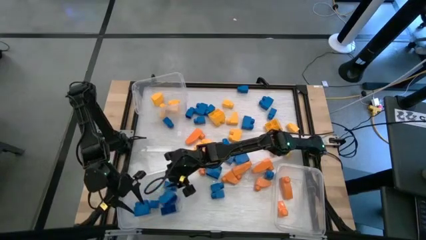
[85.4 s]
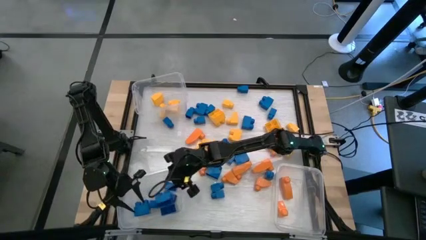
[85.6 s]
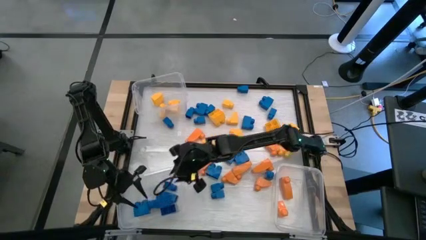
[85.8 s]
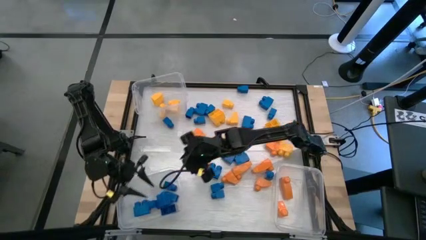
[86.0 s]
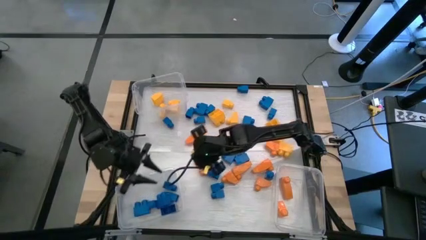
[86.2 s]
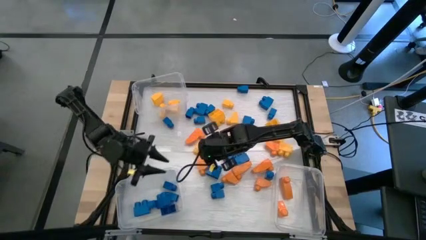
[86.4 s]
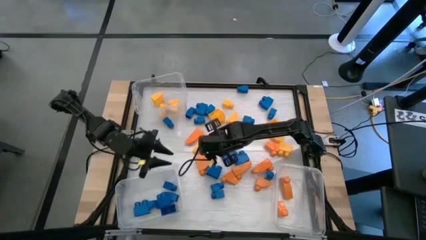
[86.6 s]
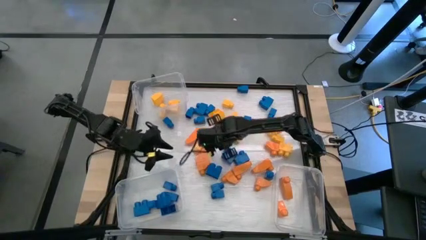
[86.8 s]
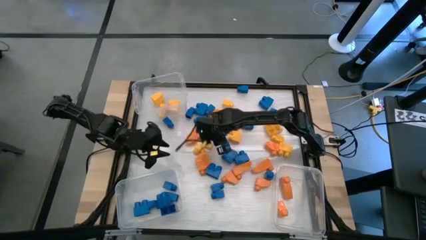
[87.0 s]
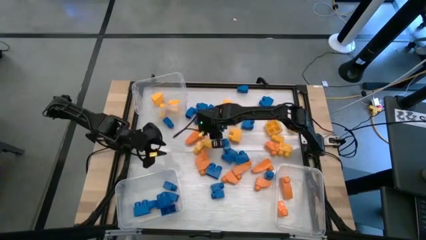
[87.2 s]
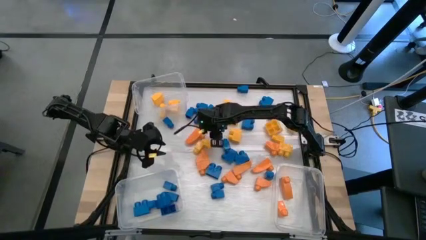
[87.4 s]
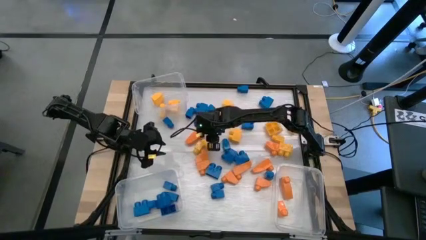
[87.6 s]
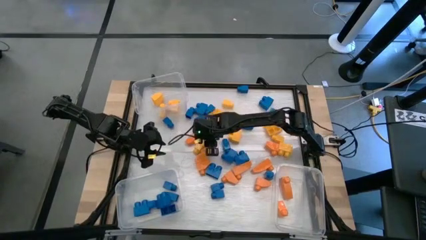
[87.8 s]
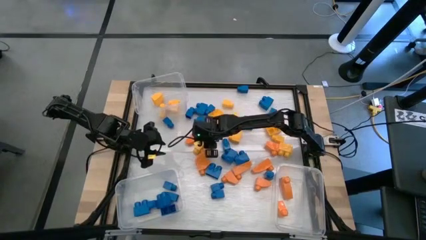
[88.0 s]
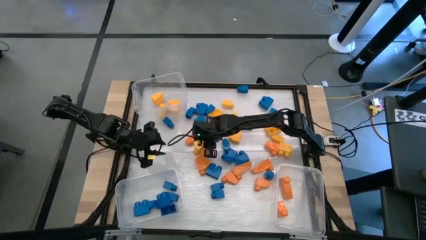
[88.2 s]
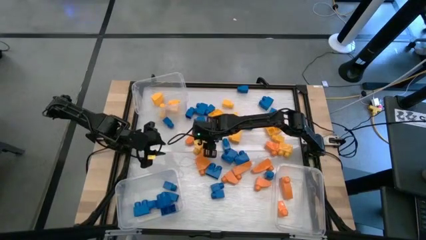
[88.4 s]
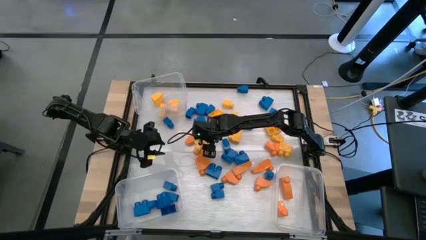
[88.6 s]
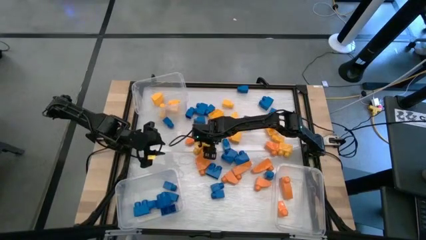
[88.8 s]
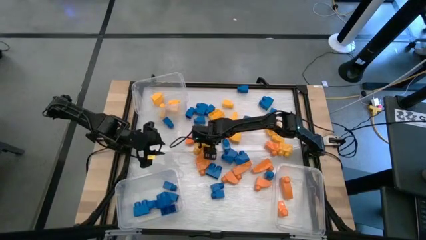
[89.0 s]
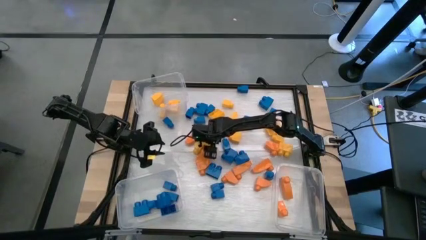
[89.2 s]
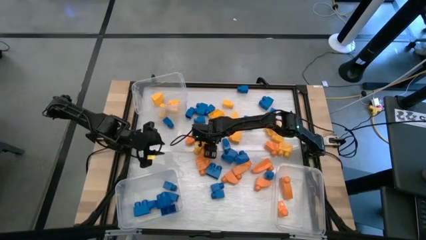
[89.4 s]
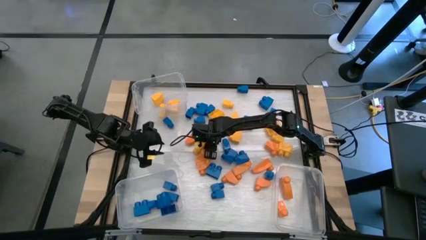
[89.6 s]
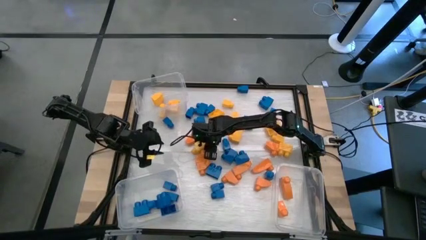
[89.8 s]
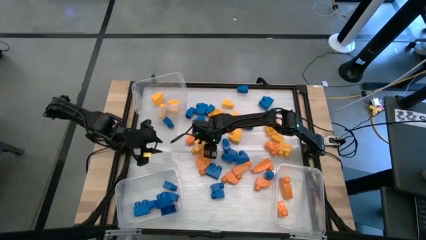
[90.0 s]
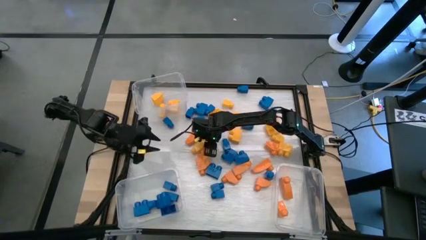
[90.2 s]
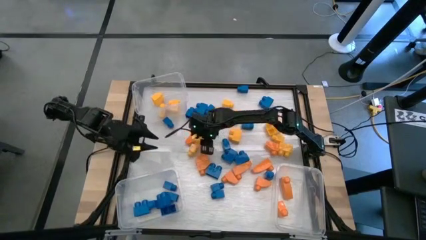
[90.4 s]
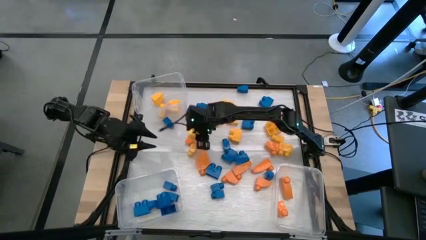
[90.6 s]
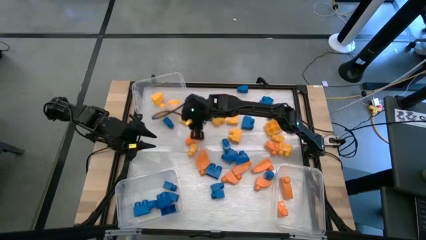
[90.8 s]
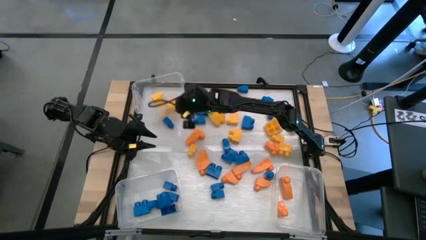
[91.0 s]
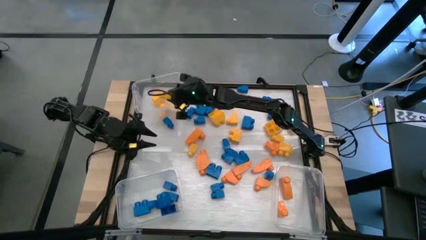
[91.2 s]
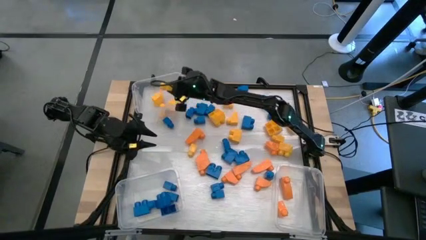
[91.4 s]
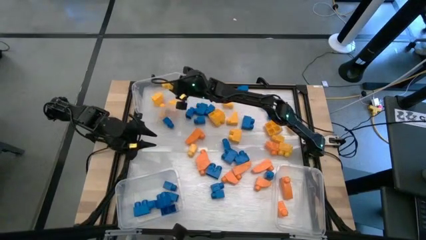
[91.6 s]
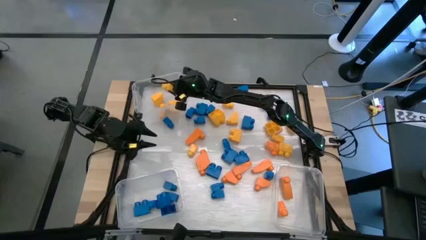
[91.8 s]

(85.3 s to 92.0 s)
Task: Sort blocks
Put the yellow game piece into the top transparent bin

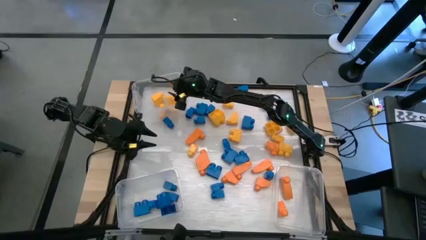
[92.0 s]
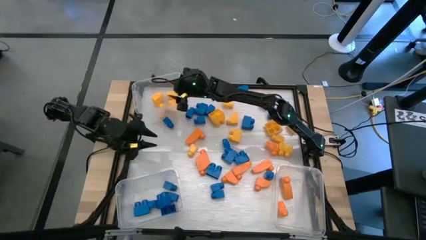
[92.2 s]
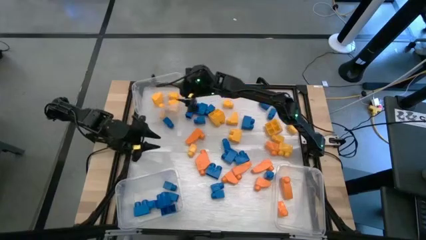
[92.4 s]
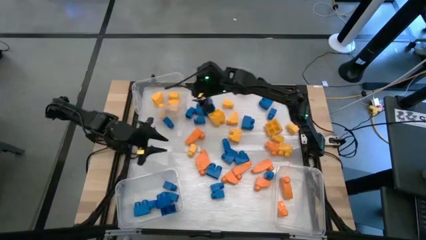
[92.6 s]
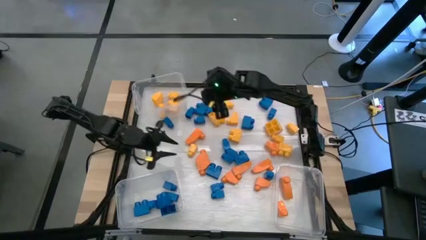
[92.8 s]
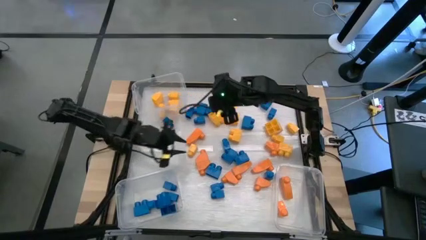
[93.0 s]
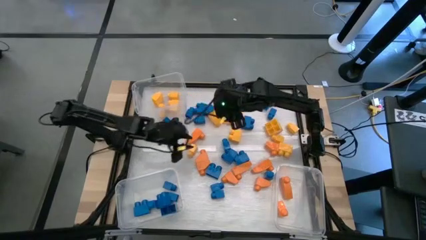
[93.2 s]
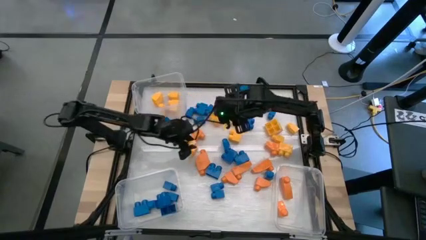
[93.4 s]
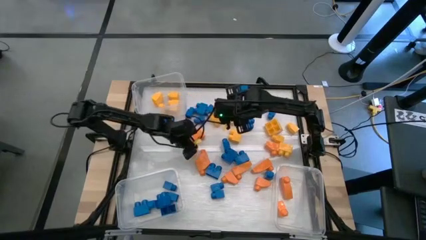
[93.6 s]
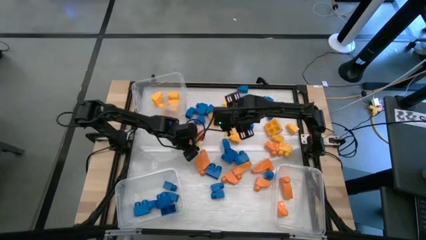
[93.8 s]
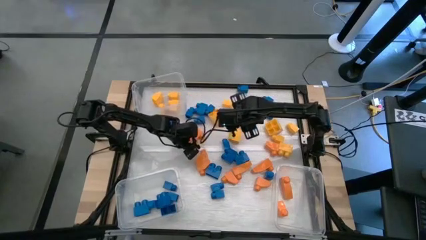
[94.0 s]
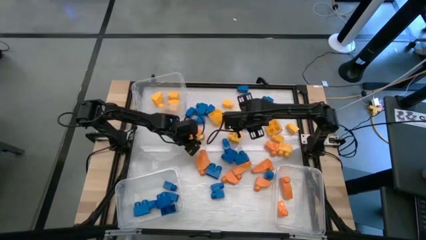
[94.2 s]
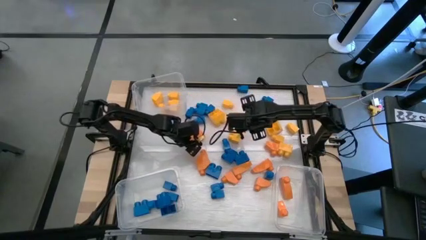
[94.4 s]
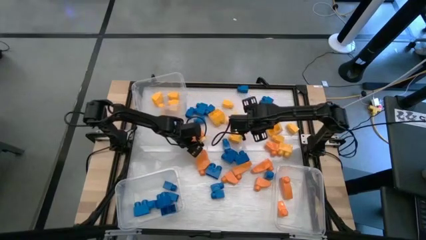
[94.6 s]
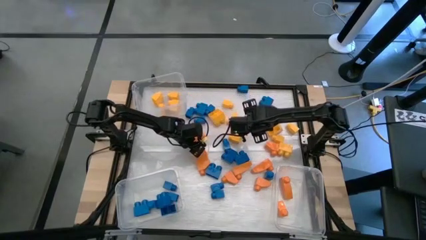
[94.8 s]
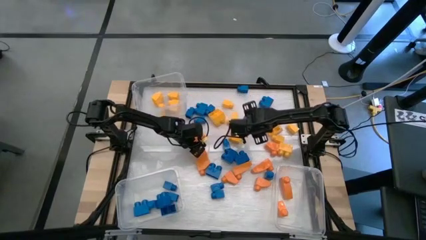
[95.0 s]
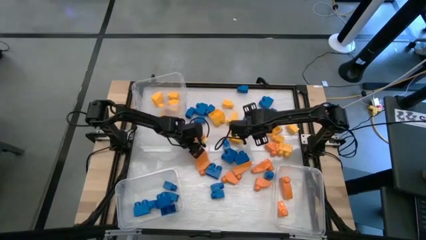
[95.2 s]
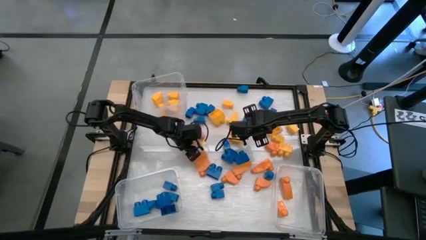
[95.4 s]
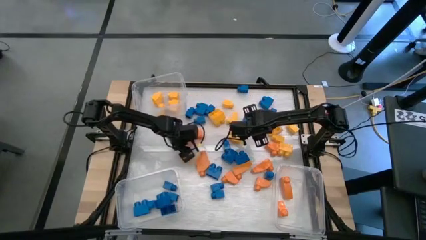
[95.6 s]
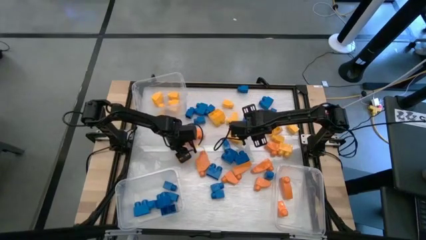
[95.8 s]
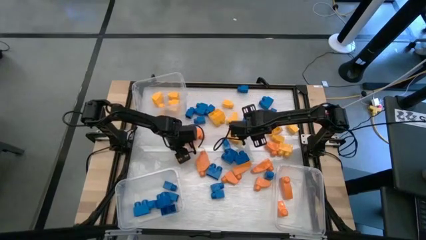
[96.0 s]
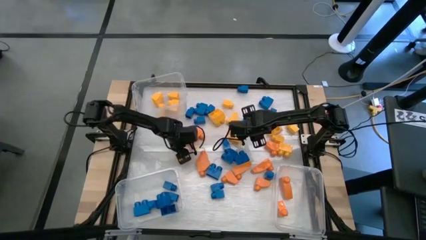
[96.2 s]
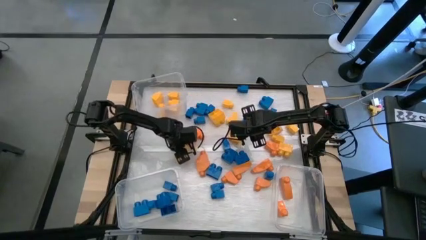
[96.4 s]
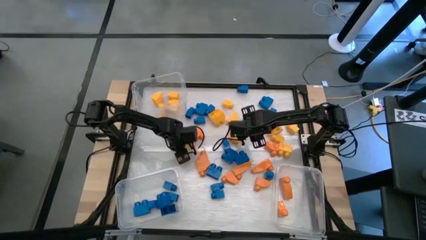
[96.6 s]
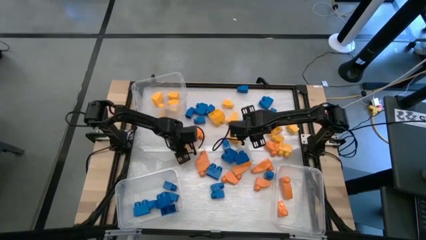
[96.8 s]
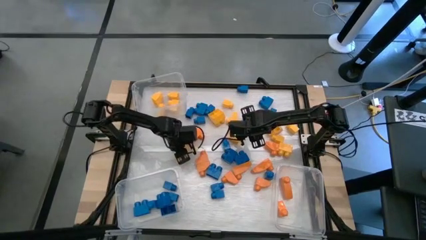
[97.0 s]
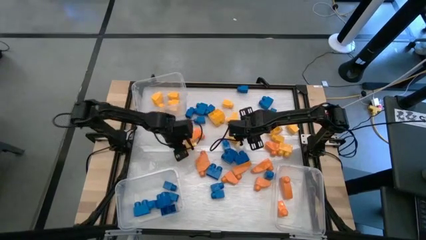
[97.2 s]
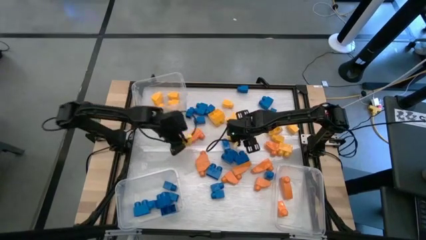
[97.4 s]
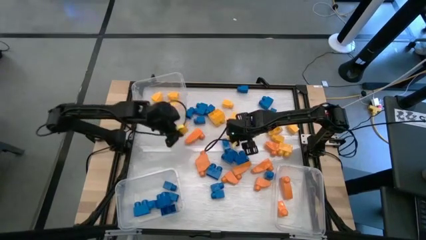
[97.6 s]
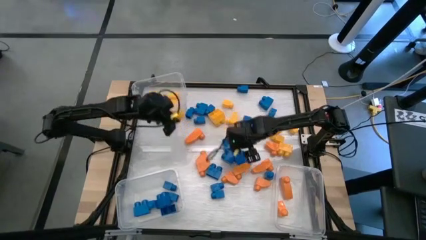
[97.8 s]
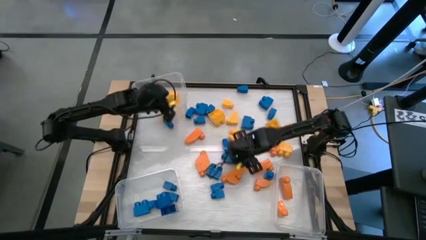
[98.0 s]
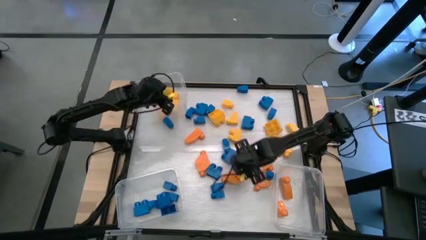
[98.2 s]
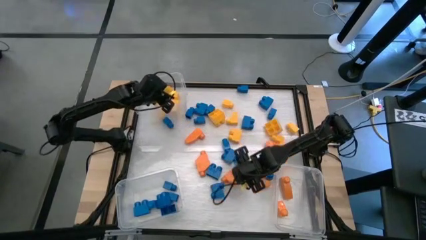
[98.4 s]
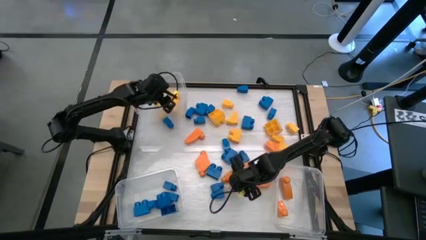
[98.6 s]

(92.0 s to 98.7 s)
Put the yellow game piece into the top transparent bin

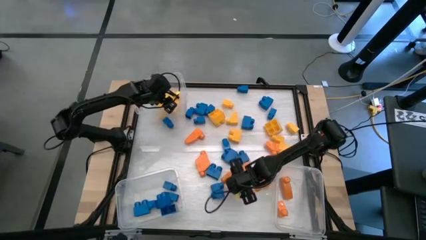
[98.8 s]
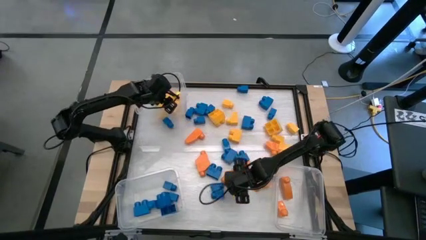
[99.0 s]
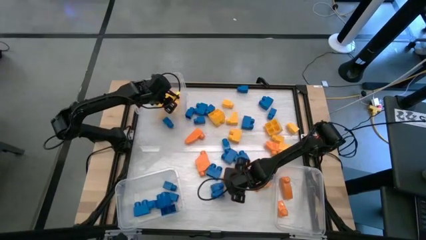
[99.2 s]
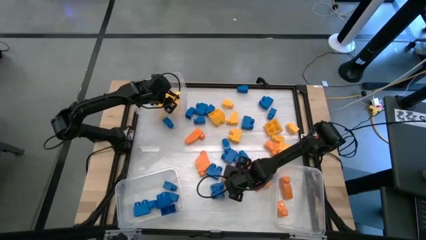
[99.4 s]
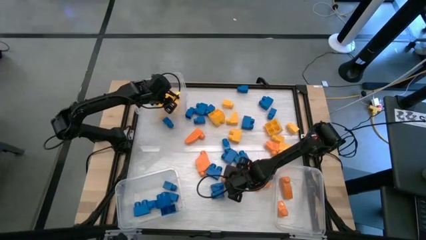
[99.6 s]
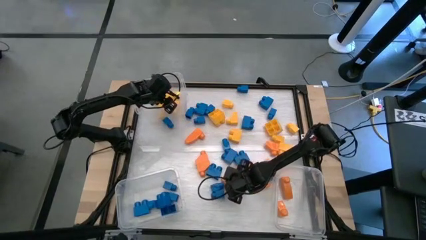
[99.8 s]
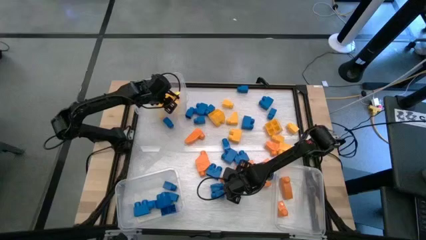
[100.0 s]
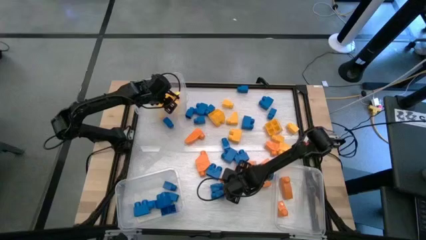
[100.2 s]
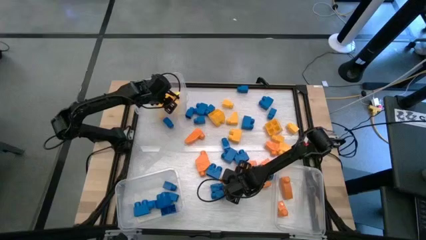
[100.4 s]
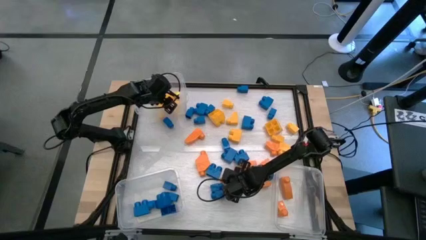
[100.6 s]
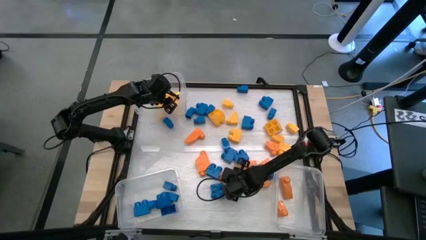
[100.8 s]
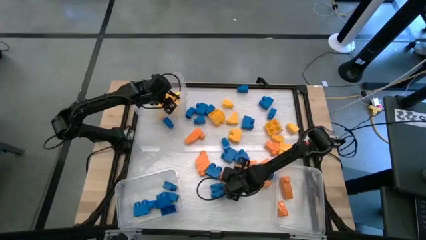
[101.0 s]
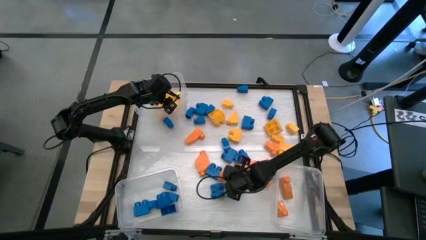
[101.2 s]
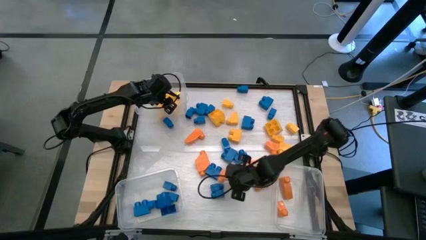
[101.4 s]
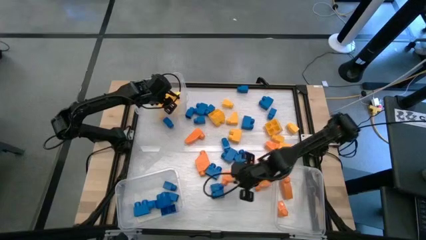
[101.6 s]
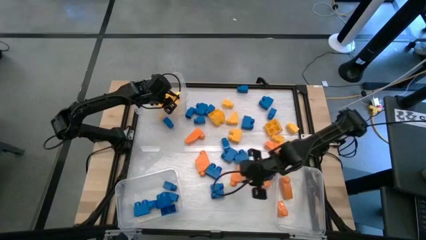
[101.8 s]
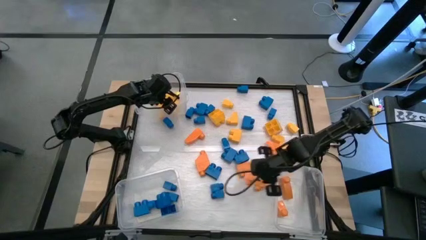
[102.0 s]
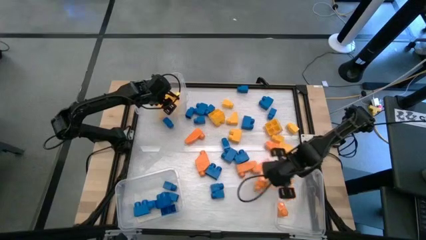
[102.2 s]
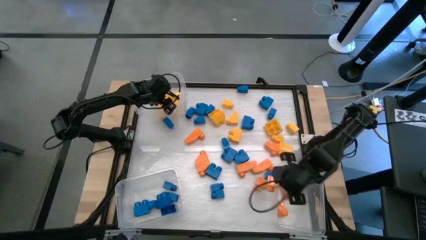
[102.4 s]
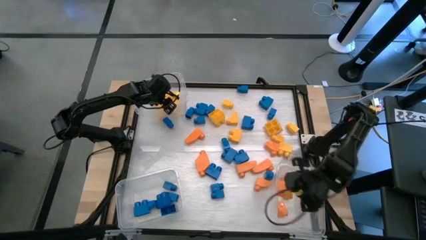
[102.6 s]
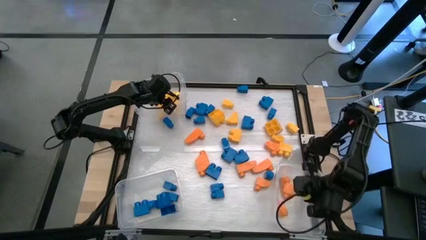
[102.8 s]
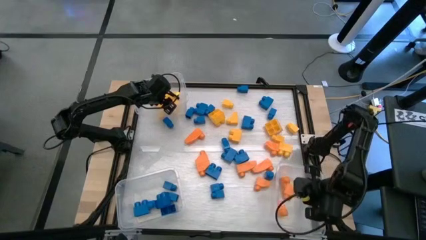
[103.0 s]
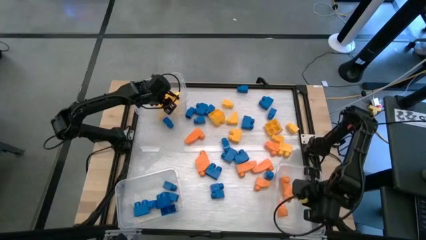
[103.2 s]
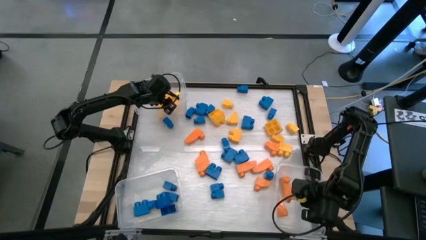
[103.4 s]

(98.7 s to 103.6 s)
Put the orange game piece into the bottom right transparent bin
